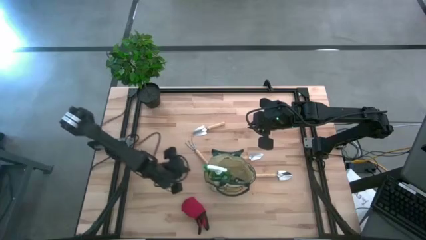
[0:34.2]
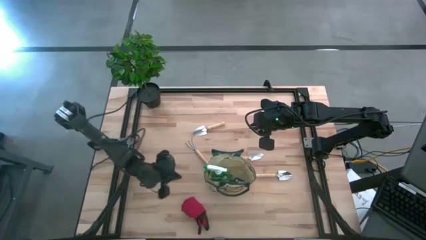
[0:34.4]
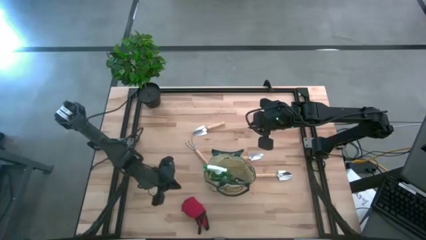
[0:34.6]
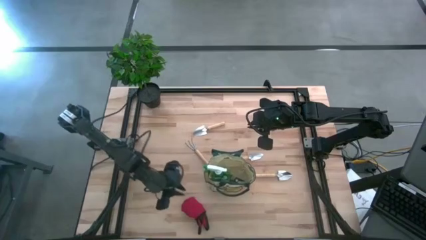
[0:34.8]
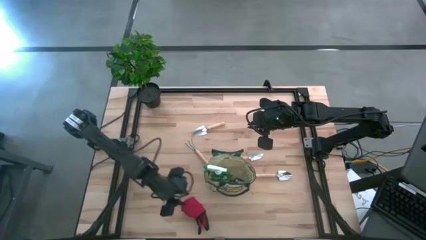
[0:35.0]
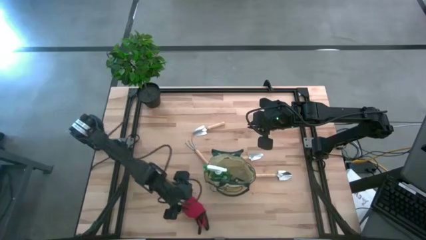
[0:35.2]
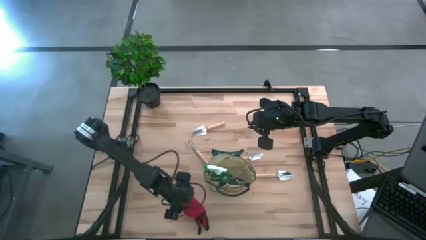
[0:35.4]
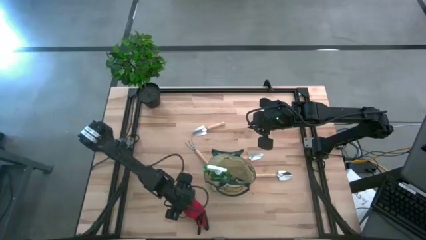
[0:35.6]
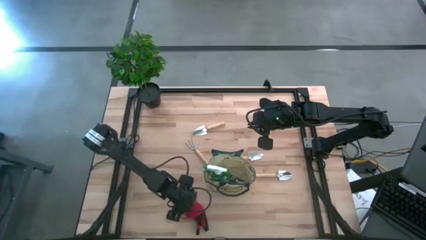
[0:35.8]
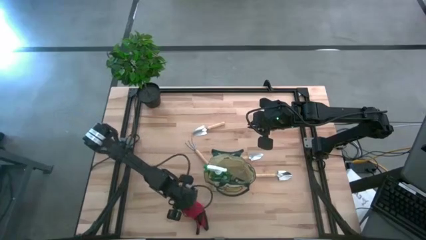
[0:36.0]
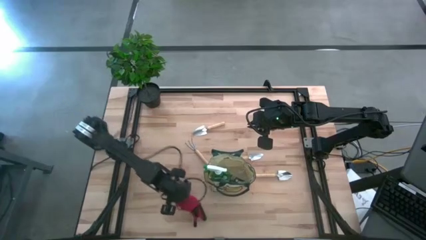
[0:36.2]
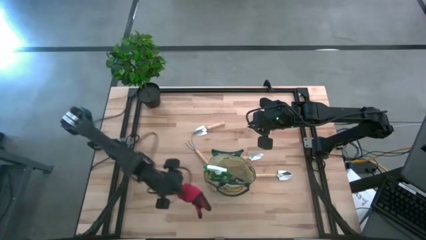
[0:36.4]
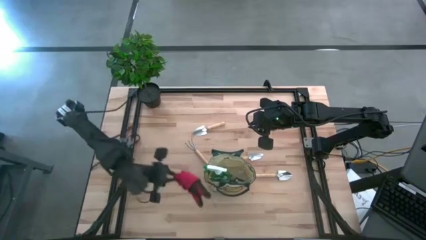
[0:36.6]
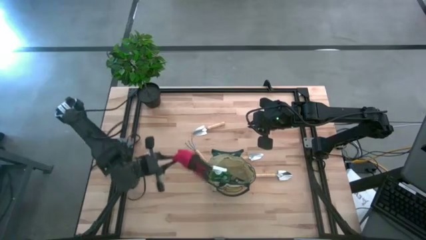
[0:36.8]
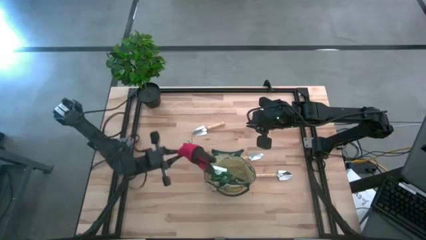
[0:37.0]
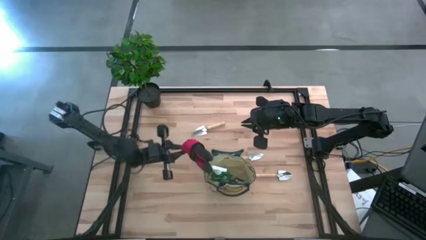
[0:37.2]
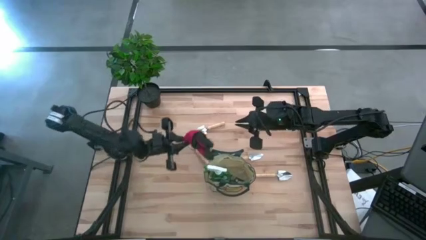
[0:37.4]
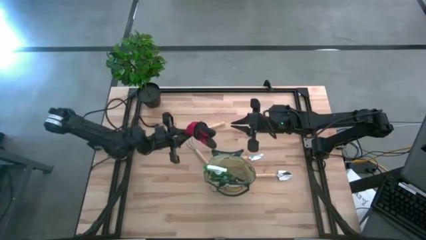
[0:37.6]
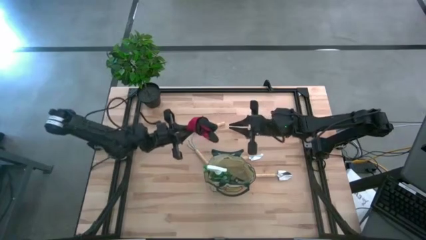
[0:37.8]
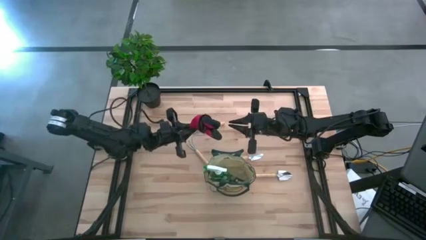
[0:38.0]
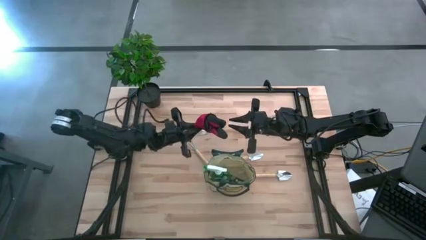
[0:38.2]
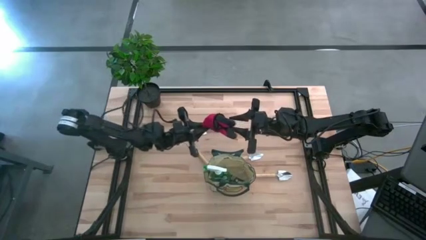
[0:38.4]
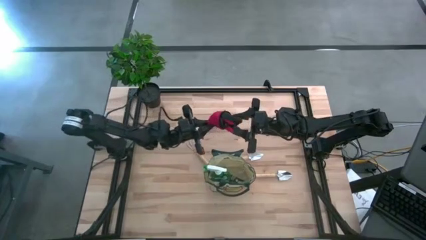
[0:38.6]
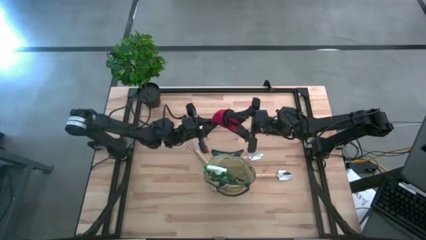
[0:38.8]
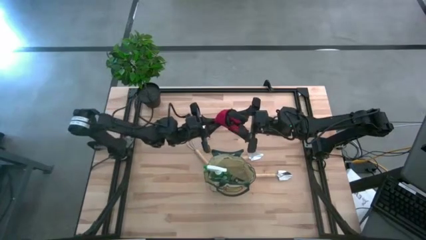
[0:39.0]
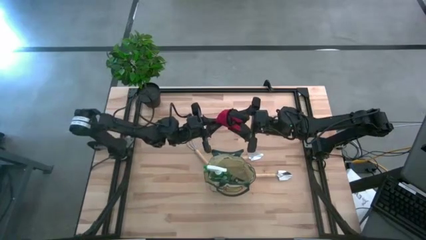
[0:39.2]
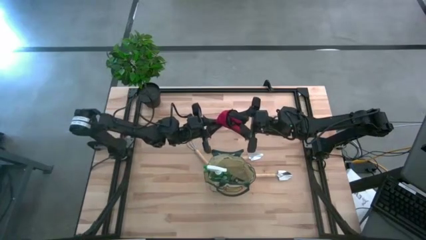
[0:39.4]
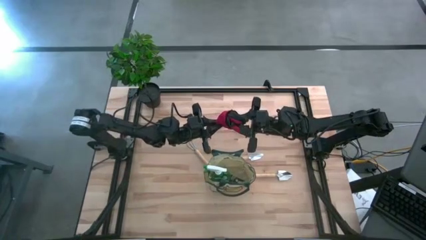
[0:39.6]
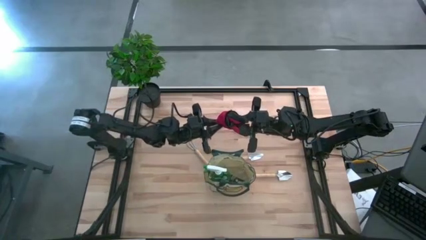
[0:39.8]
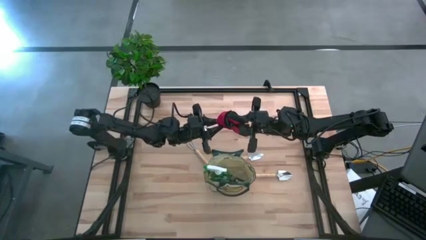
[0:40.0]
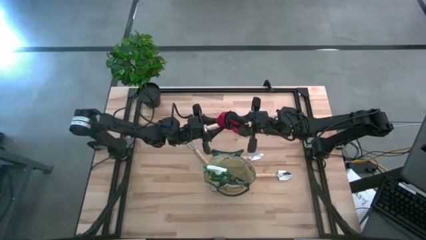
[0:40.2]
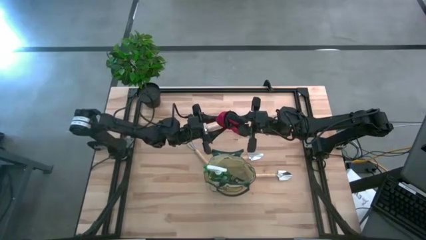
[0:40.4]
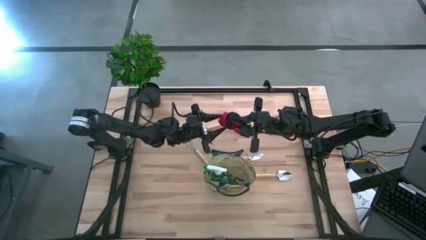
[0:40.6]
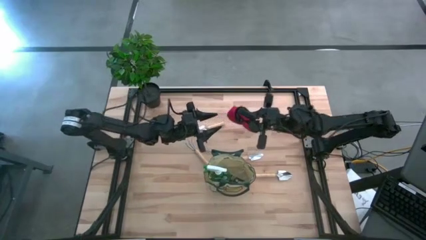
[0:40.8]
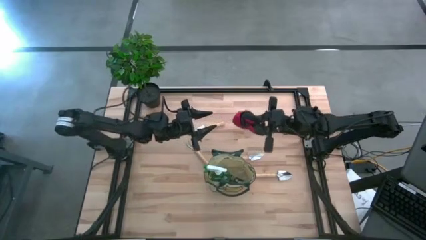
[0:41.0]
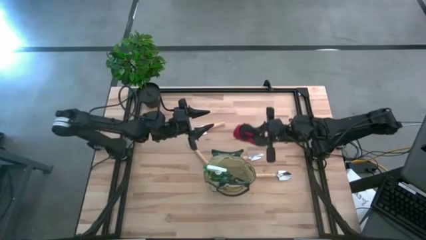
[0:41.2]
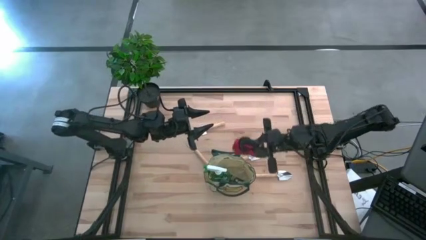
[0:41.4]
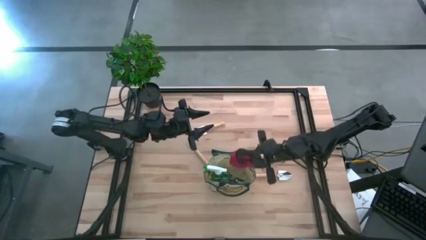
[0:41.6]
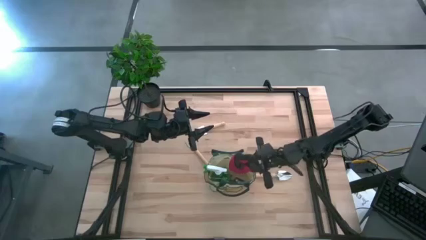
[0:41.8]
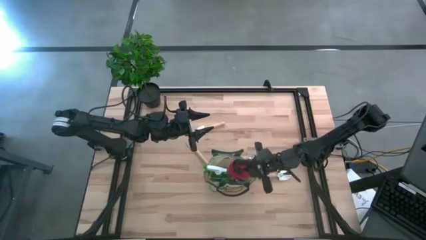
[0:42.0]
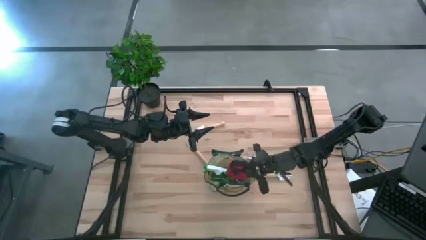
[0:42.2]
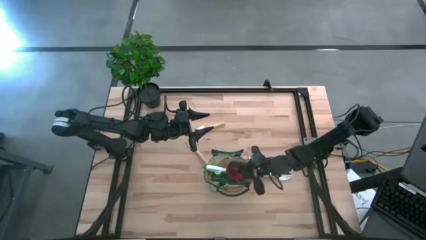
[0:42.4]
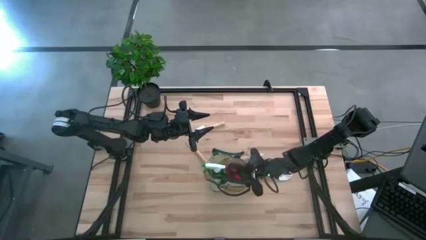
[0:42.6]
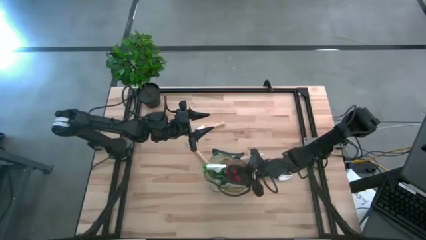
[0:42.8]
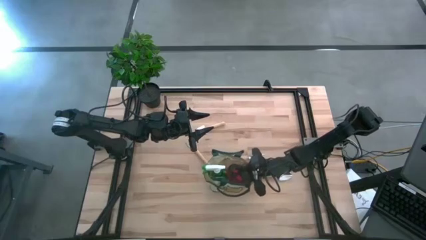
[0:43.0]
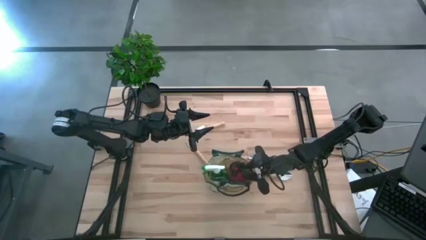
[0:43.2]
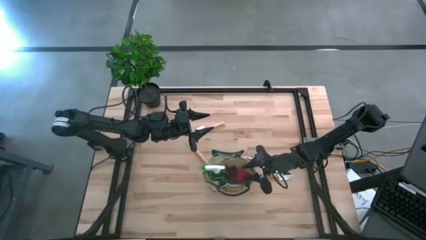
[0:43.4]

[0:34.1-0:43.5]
Task: Pick & Place Garden tools in Gardening bag
Put the gardening gloves into the gardening bag

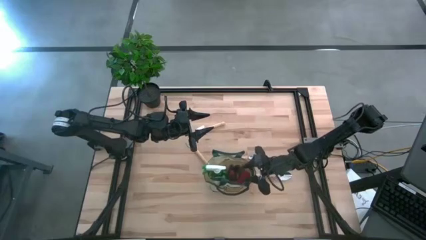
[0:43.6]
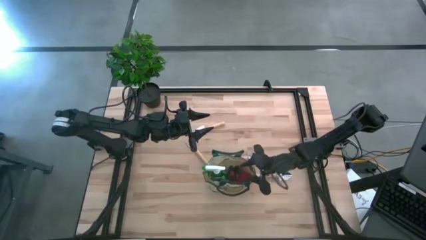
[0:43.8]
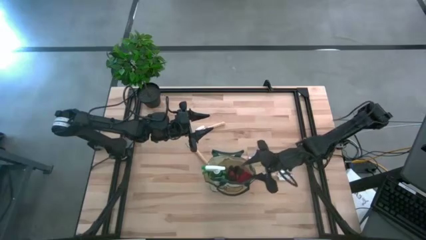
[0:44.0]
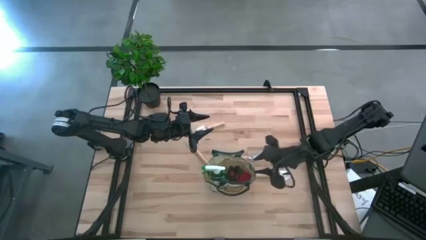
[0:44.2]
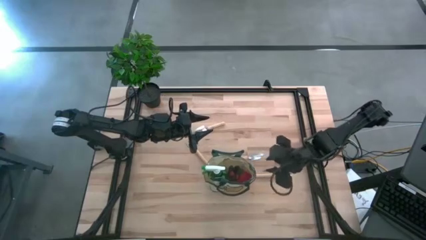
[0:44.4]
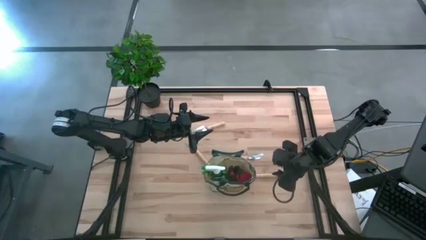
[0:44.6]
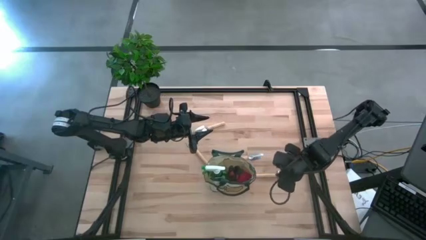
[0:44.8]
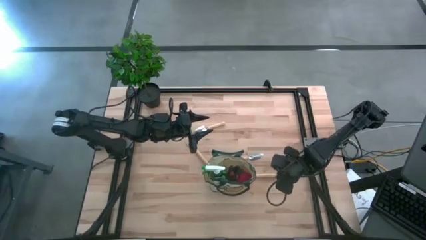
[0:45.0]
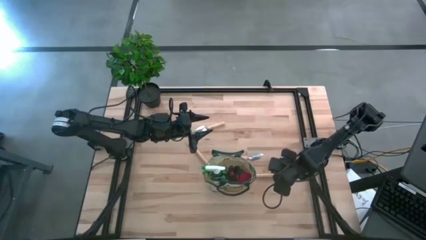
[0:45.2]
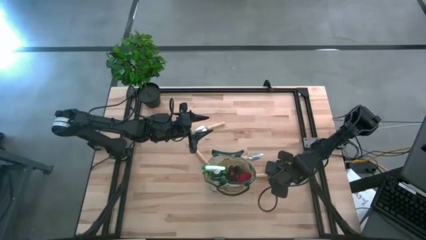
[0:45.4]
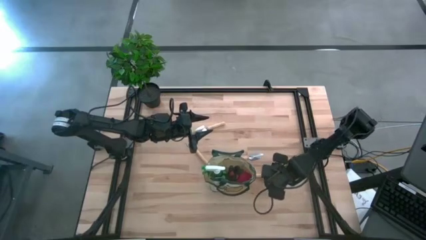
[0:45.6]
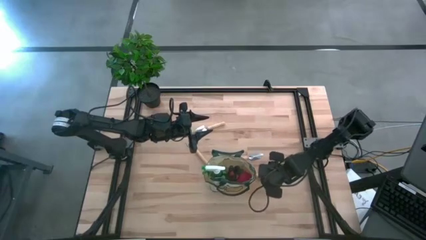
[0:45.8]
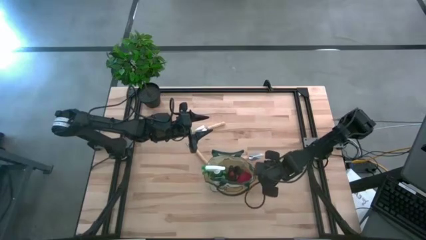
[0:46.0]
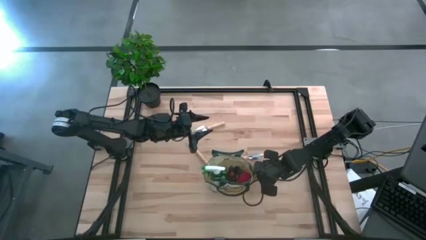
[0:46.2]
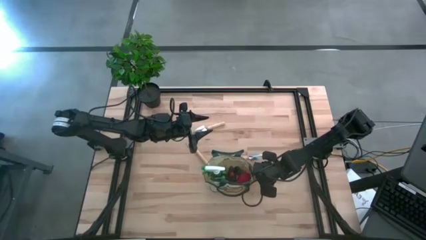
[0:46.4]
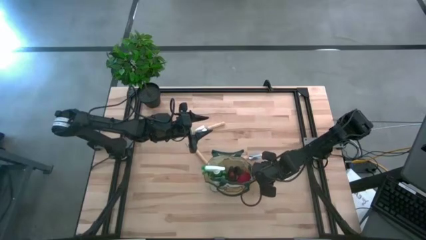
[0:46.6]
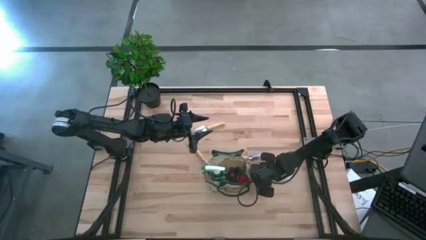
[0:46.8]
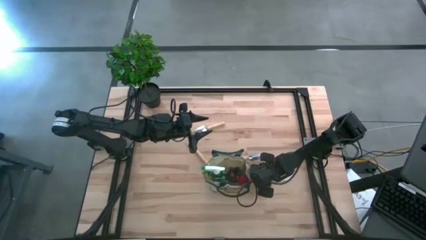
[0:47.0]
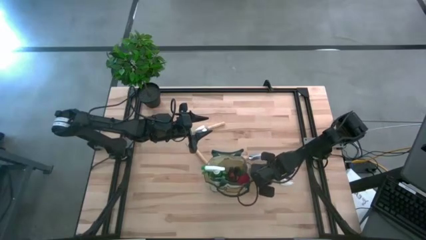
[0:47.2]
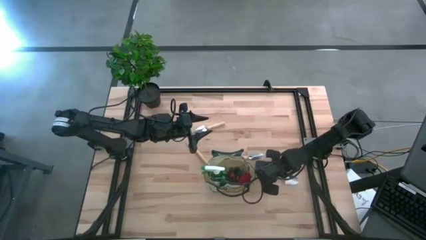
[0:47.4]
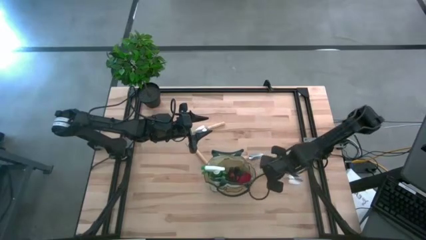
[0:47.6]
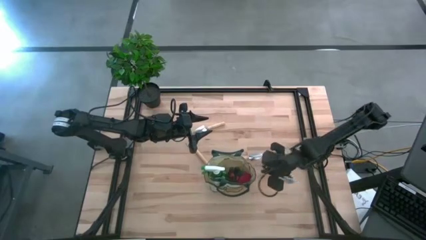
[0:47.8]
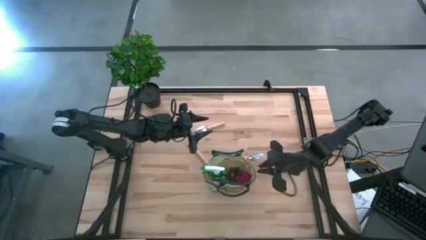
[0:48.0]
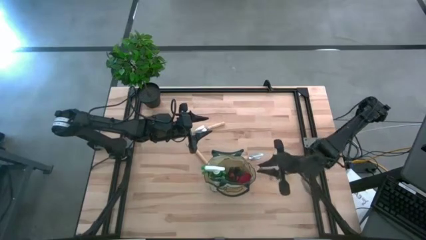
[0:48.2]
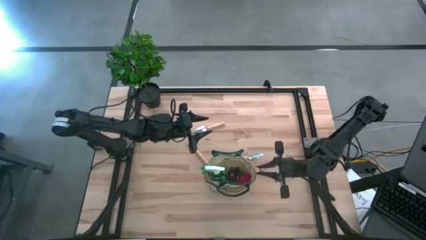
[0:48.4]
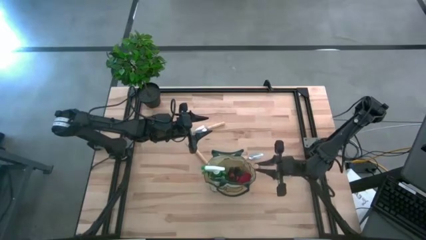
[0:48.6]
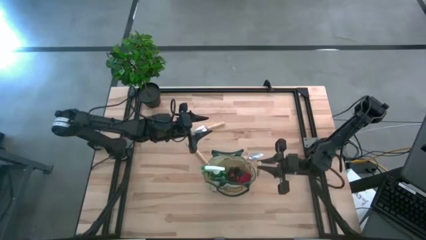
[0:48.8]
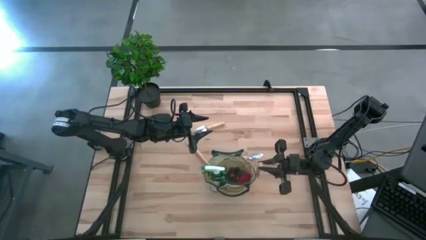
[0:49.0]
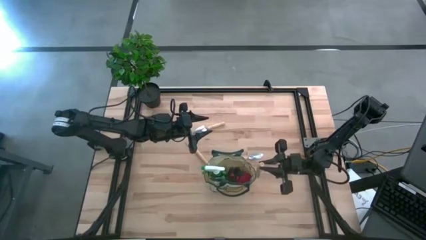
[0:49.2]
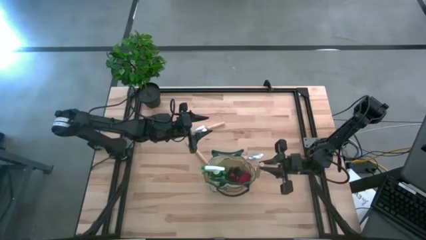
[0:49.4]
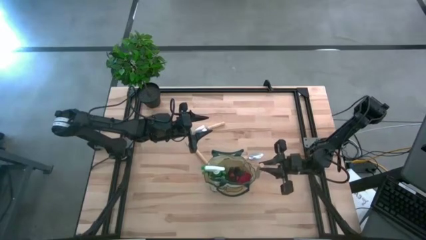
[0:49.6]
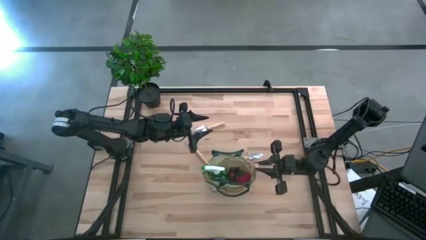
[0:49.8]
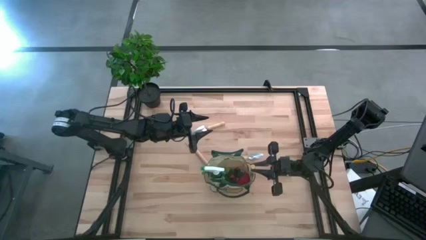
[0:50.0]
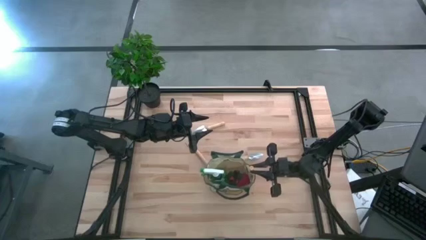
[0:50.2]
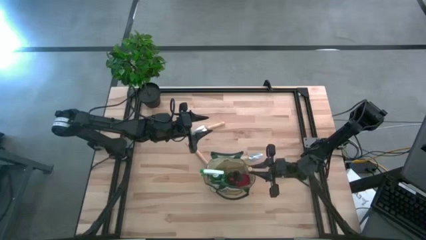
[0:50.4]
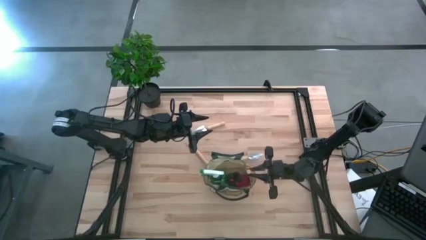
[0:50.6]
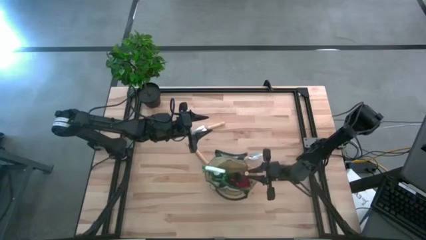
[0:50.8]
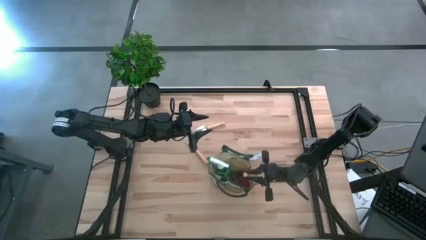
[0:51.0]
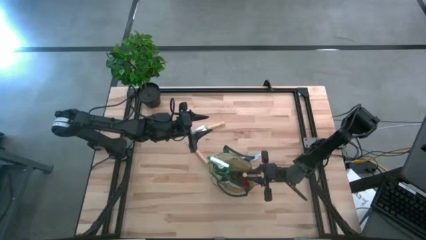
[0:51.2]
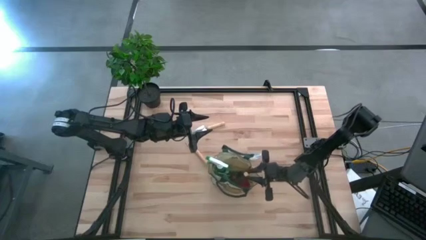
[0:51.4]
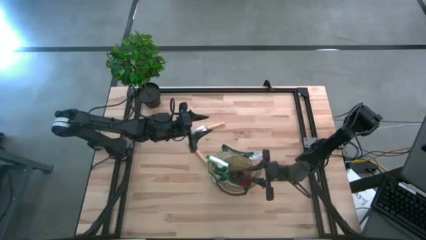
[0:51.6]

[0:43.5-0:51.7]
Put the bottom trowel into the gardening bag
